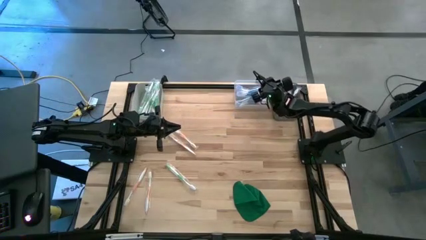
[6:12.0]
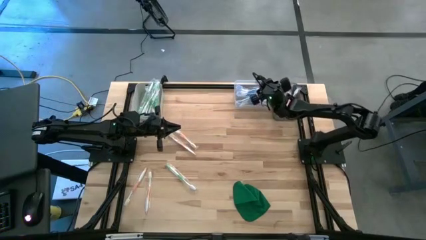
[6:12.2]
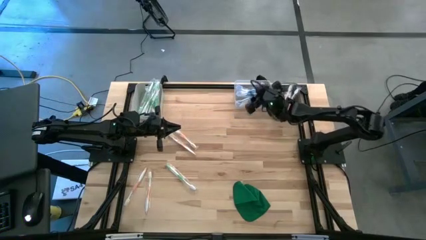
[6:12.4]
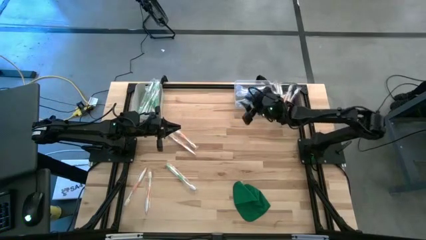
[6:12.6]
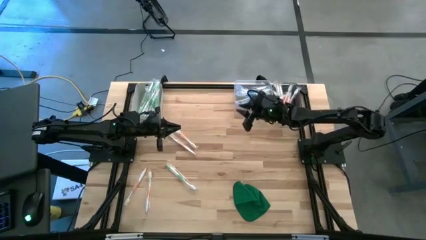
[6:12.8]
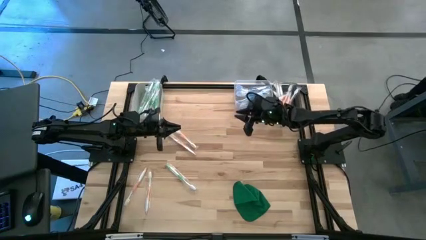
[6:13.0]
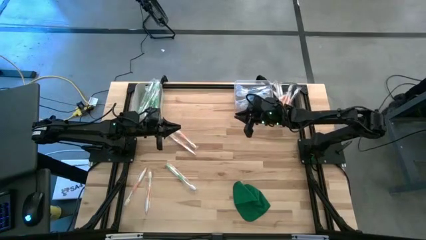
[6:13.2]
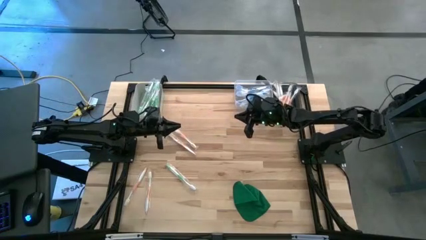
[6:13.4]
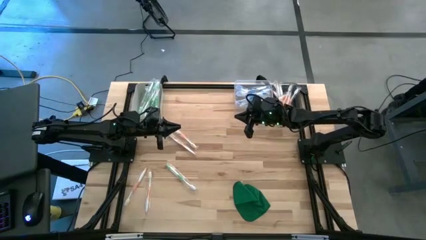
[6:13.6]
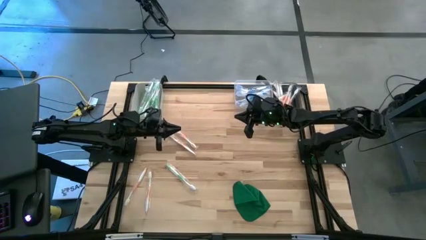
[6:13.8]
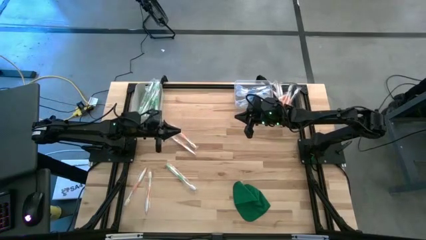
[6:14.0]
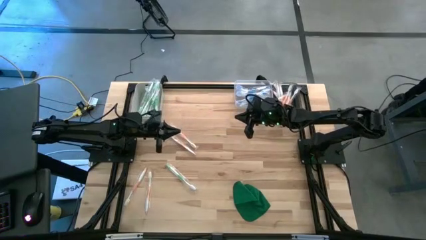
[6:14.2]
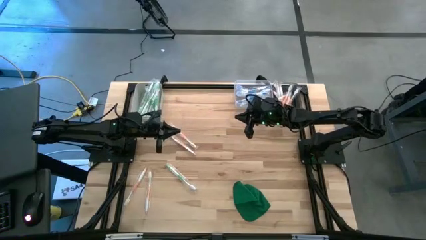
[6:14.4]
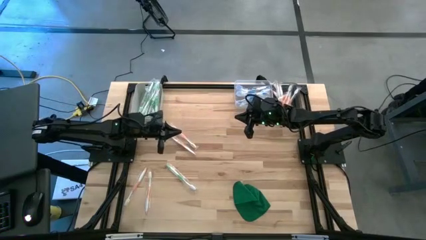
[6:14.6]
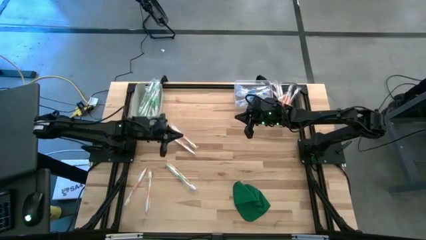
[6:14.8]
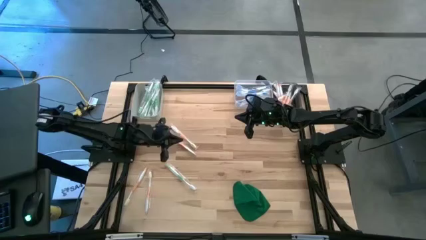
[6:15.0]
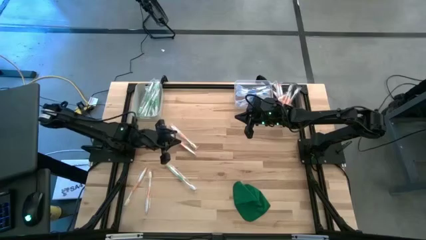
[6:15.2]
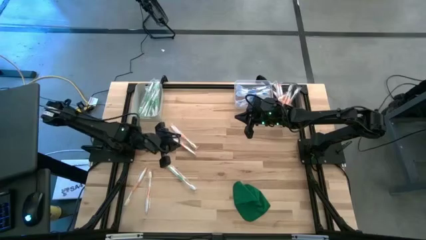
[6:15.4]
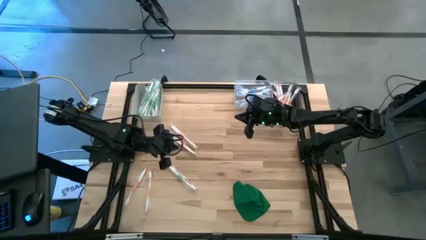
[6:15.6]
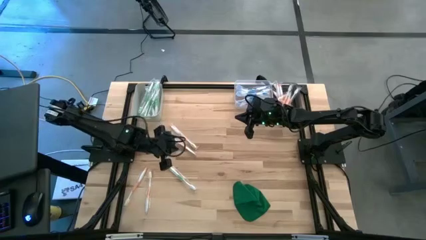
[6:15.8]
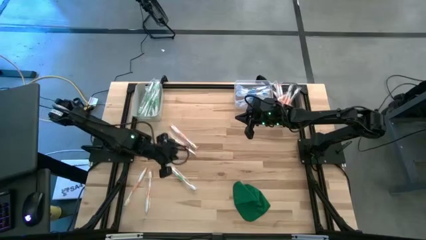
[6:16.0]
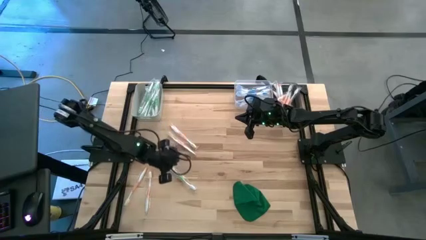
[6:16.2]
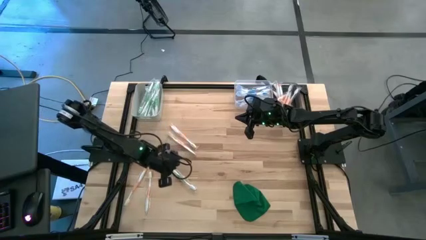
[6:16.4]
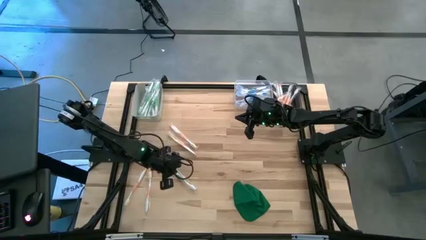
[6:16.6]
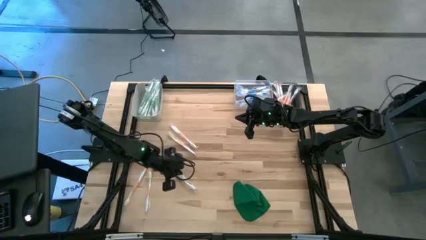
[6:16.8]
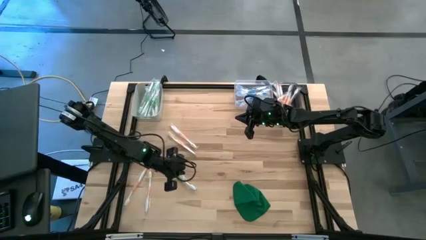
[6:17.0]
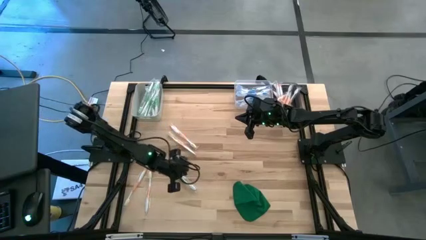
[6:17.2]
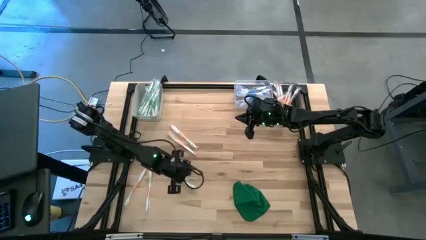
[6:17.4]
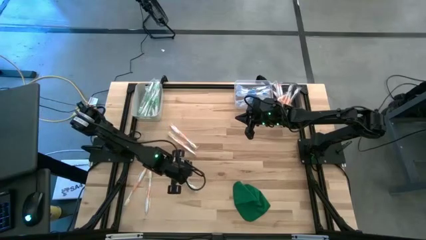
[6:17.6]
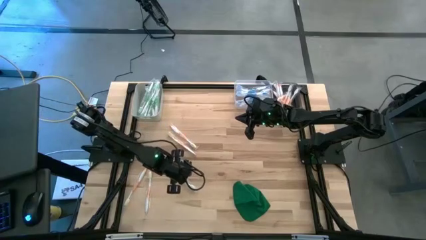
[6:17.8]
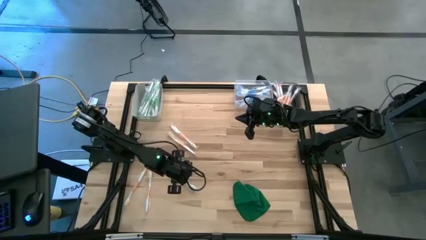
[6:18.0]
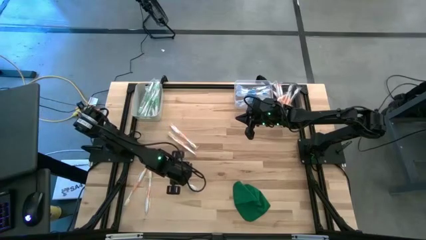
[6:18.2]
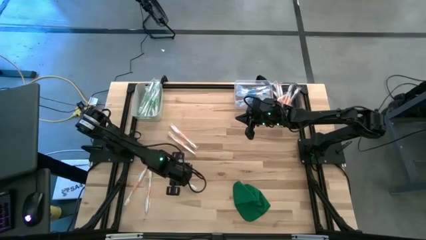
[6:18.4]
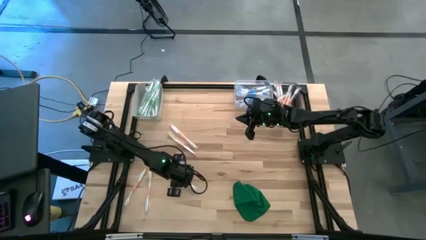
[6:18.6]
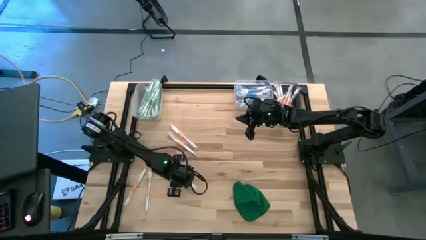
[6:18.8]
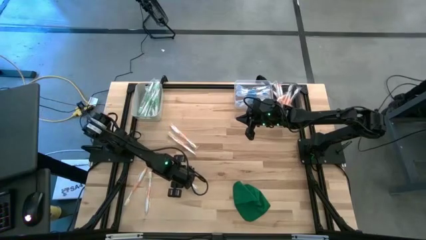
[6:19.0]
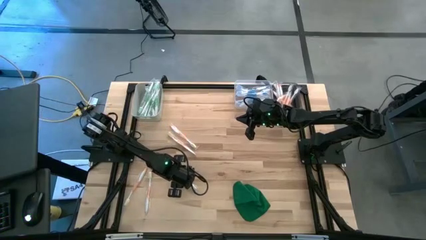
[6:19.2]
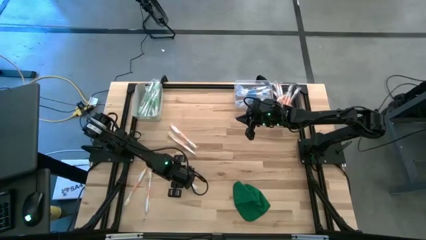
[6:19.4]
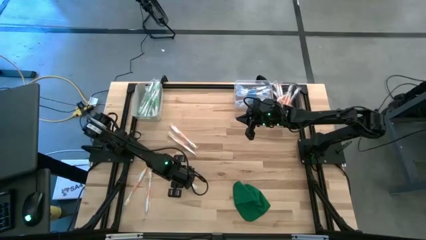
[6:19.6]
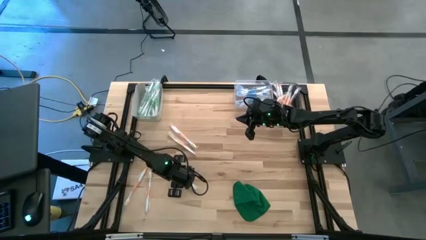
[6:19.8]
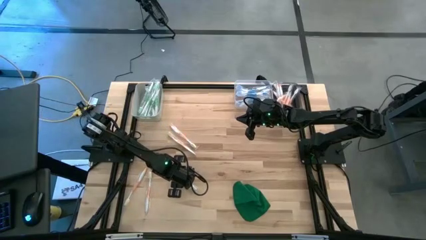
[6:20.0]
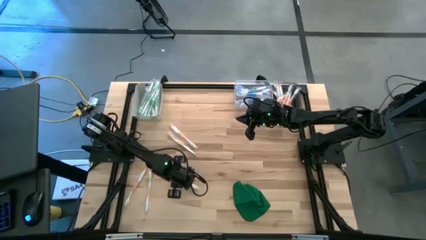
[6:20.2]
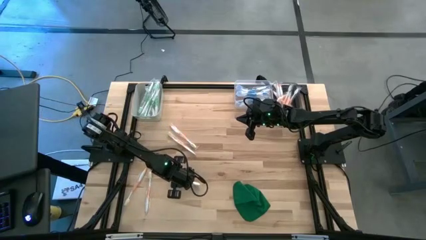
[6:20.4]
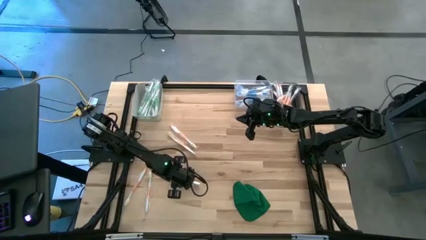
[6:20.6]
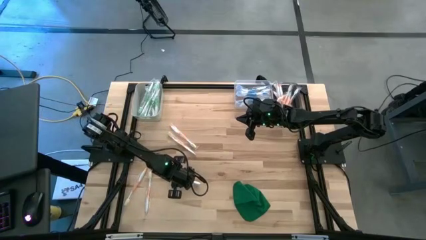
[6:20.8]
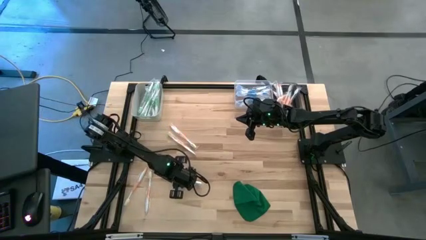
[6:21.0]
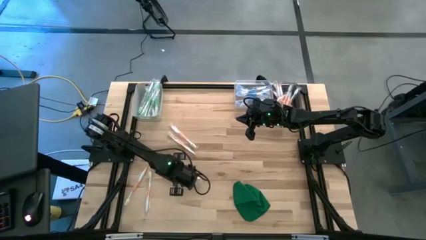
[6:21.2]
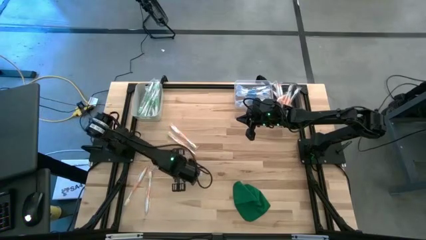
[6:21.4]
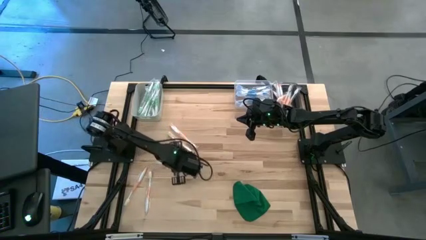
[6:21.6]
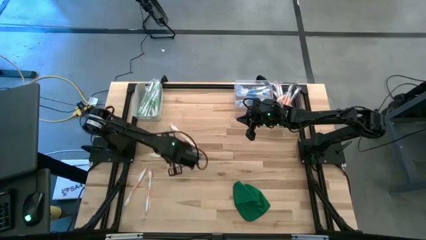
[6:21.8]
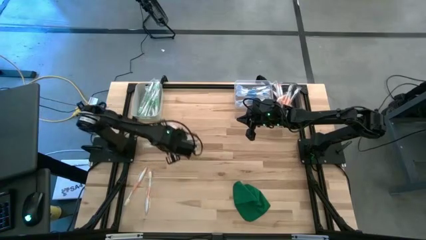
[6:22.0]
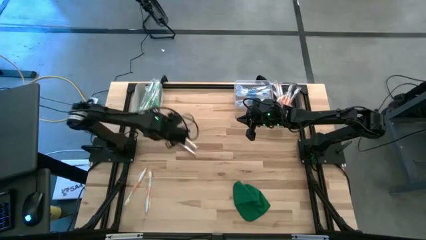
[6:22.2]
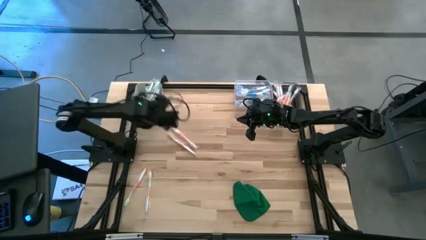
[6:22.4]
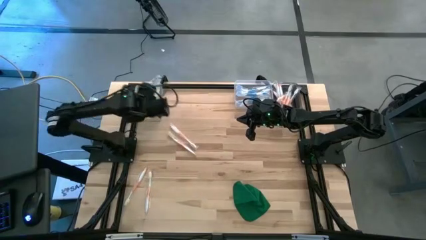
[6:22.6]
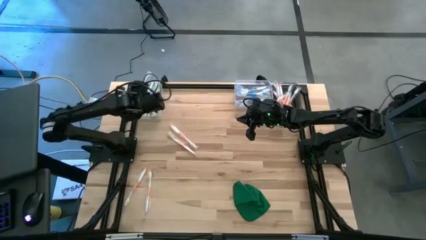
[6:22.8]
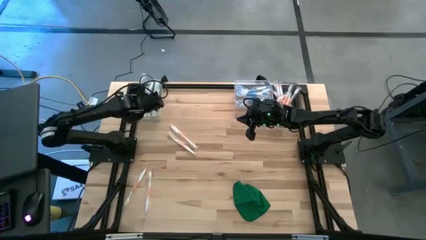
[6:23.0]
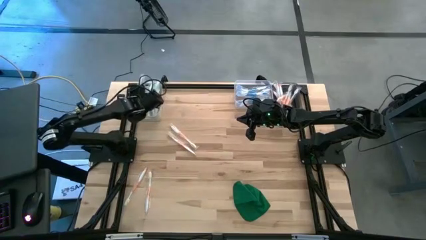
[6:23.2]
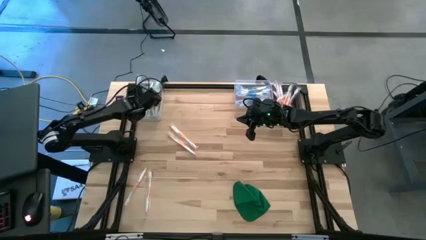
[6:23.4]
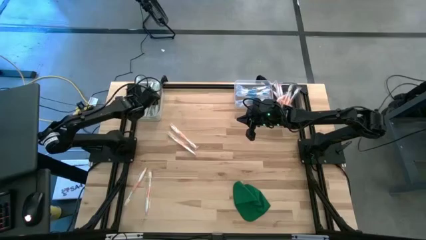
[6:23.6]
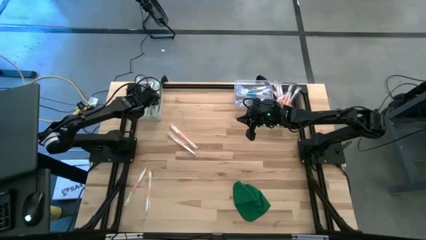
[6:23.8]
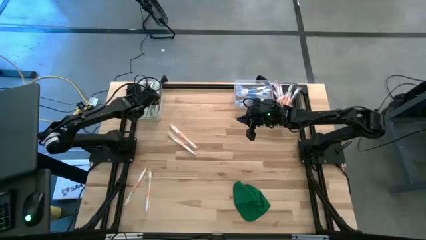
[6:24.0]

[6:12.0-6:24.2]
Task: Pick & Place Toothbrushes
Put the green toothbrush into the gray bin
